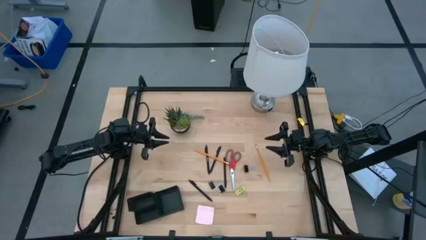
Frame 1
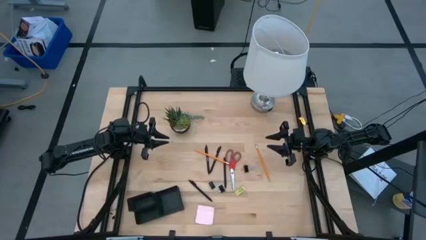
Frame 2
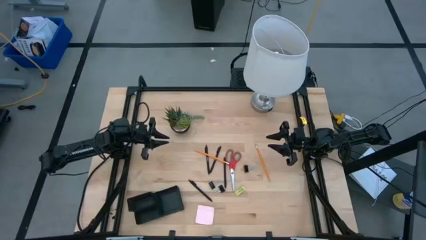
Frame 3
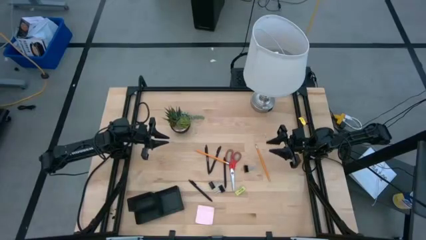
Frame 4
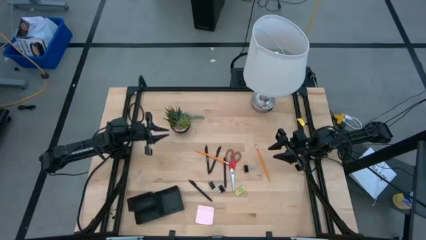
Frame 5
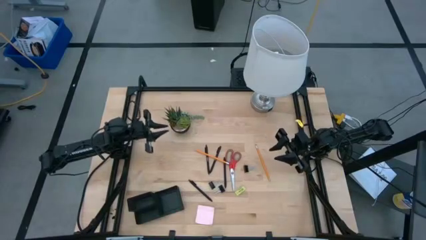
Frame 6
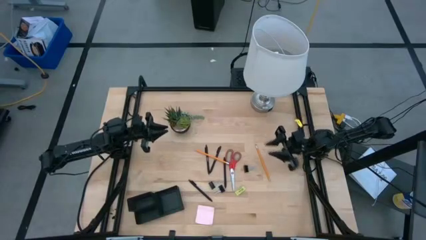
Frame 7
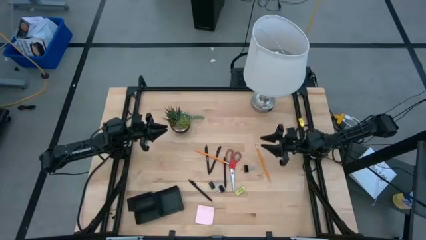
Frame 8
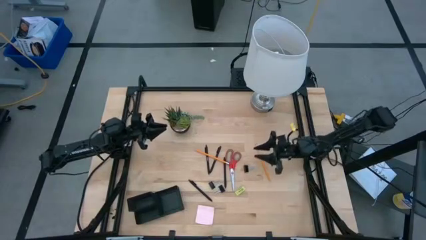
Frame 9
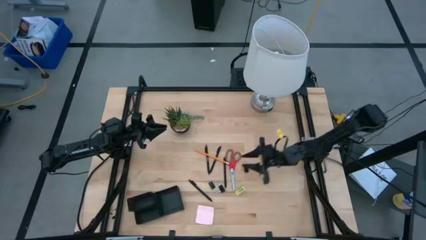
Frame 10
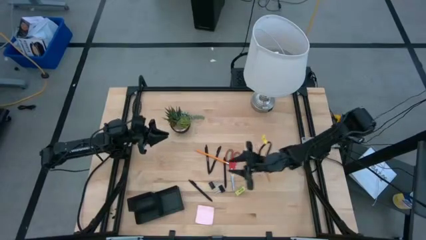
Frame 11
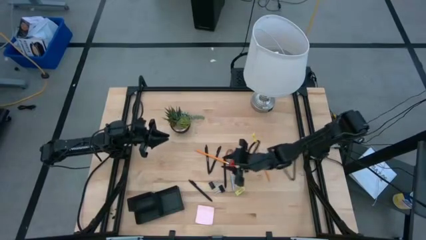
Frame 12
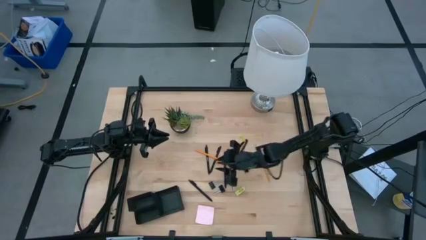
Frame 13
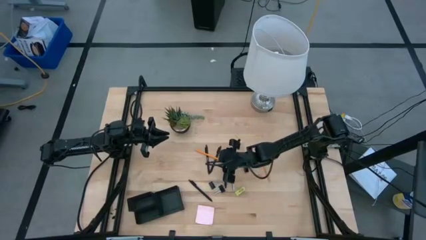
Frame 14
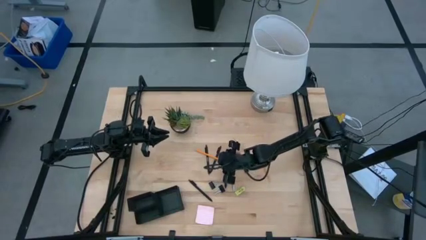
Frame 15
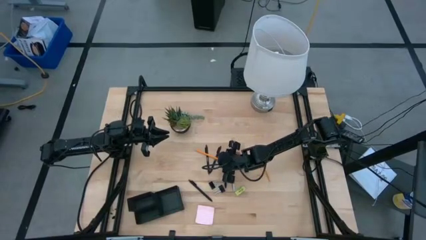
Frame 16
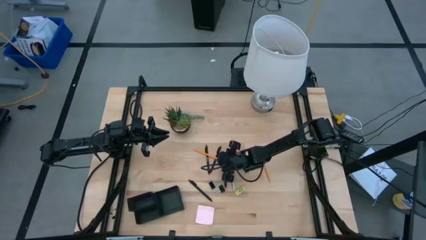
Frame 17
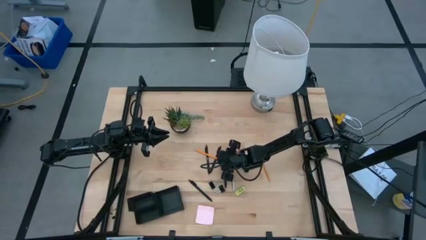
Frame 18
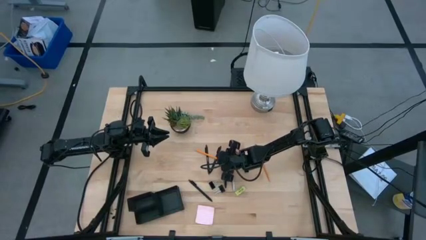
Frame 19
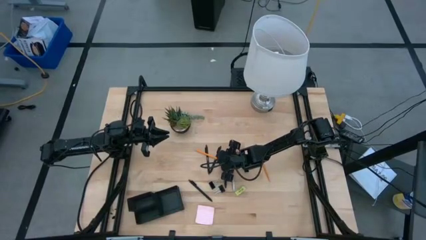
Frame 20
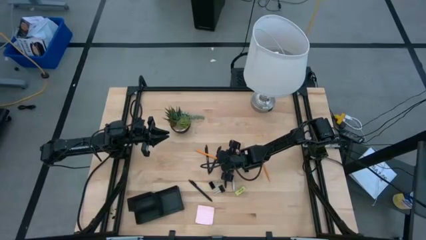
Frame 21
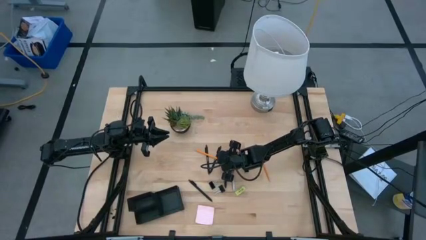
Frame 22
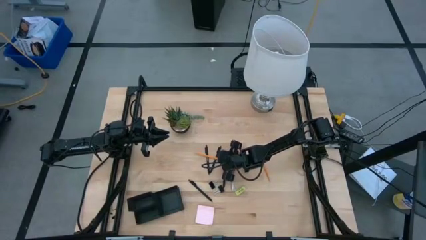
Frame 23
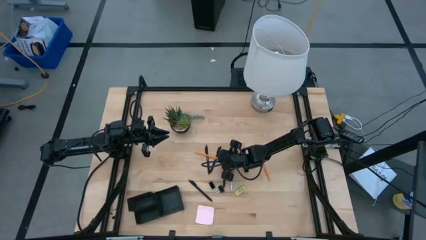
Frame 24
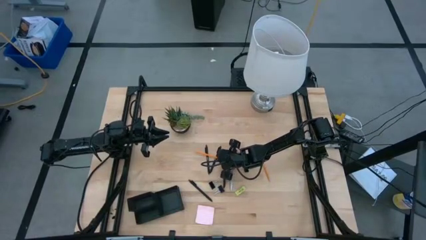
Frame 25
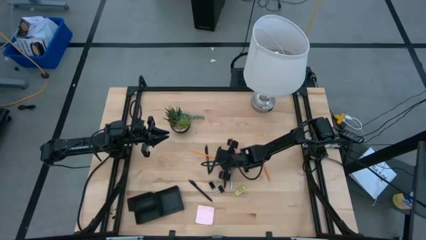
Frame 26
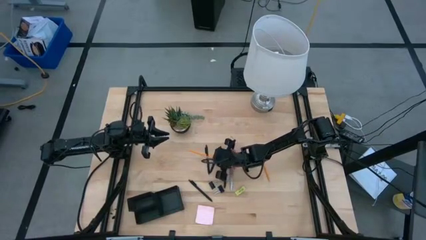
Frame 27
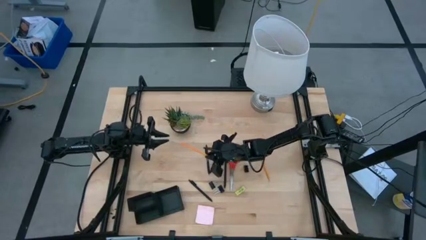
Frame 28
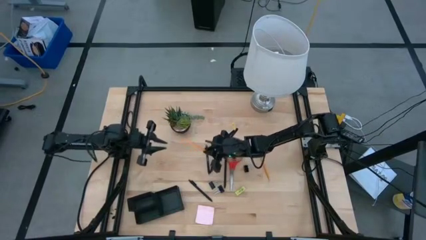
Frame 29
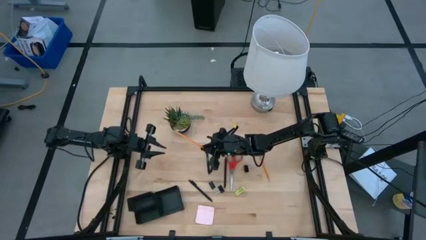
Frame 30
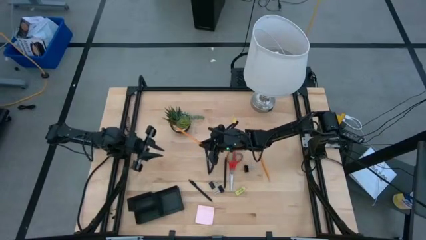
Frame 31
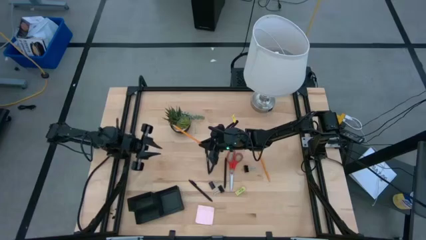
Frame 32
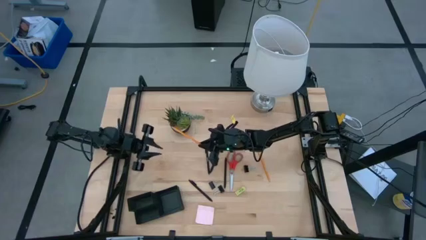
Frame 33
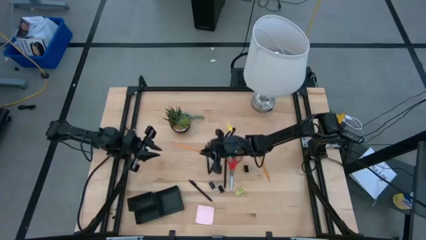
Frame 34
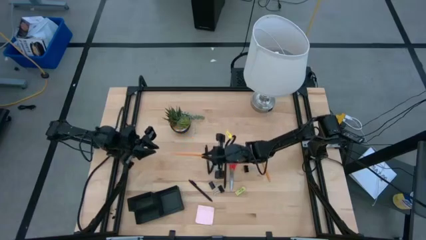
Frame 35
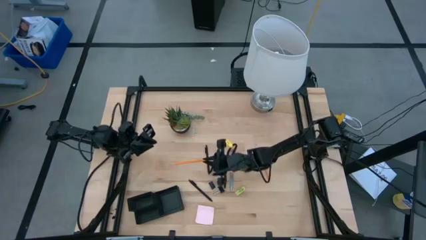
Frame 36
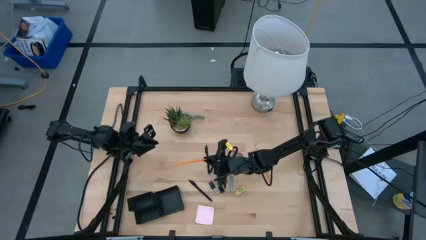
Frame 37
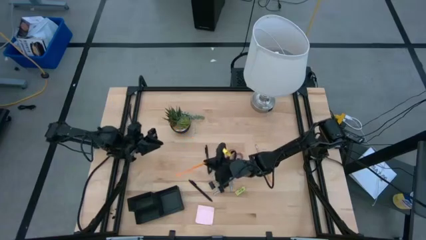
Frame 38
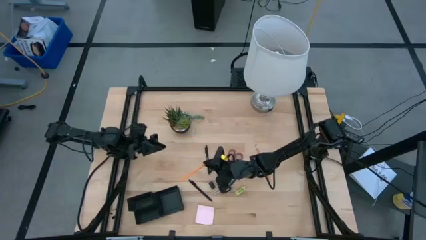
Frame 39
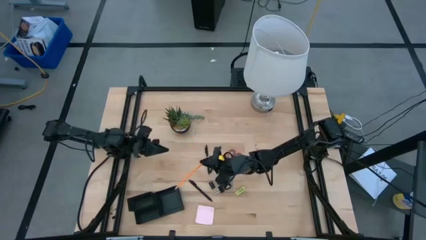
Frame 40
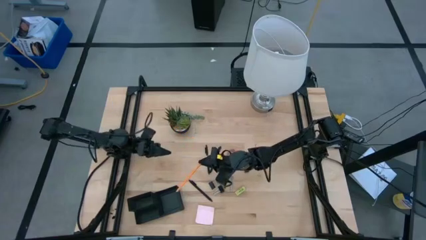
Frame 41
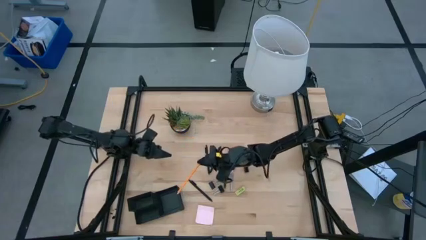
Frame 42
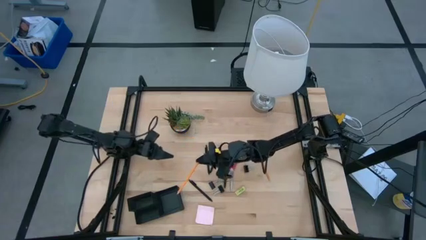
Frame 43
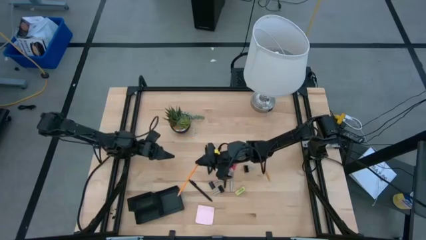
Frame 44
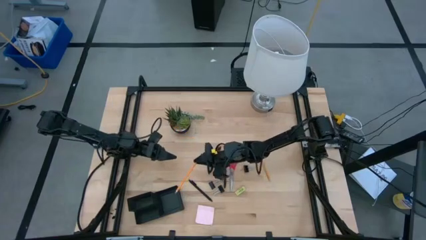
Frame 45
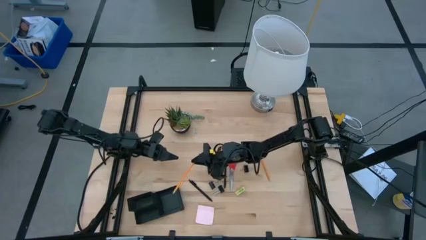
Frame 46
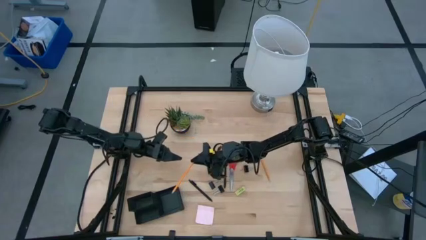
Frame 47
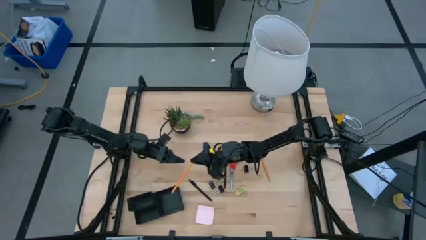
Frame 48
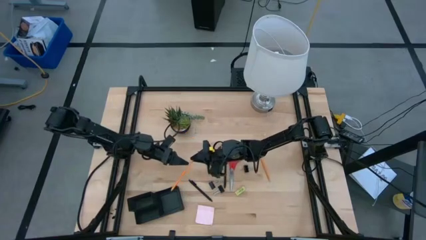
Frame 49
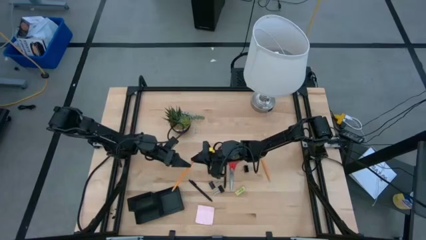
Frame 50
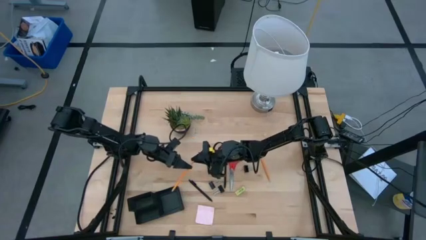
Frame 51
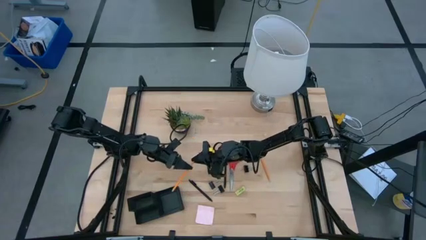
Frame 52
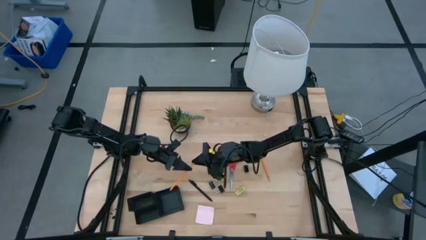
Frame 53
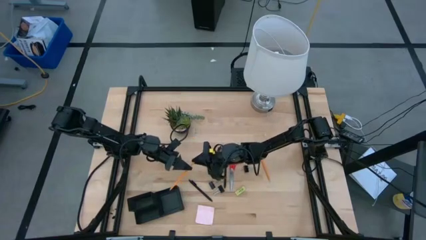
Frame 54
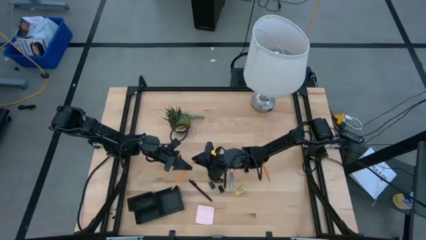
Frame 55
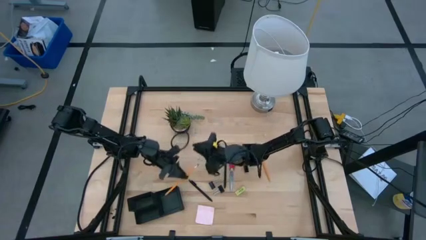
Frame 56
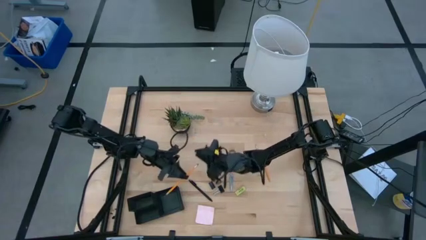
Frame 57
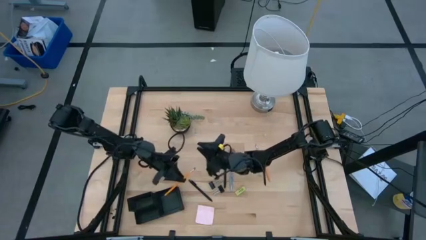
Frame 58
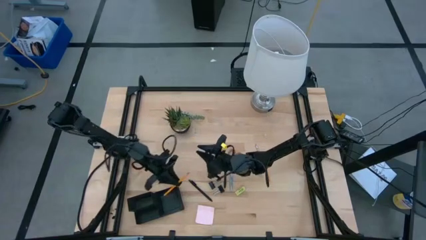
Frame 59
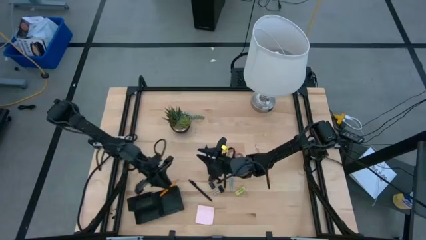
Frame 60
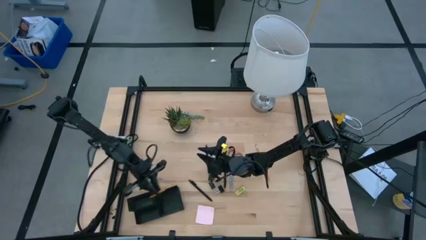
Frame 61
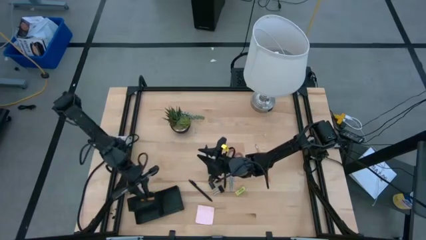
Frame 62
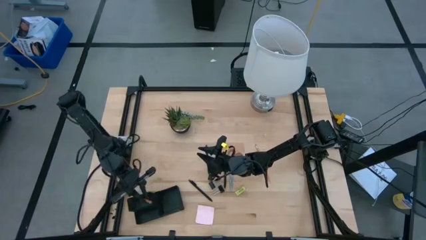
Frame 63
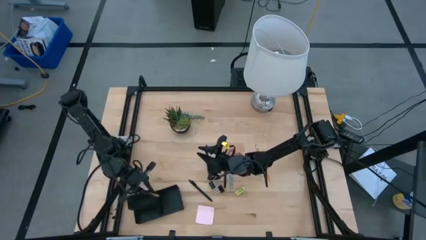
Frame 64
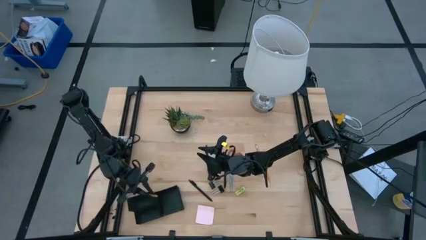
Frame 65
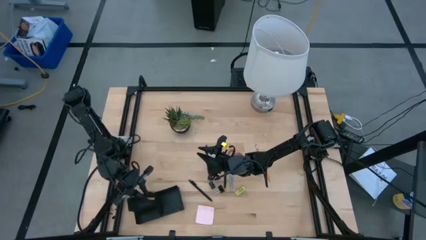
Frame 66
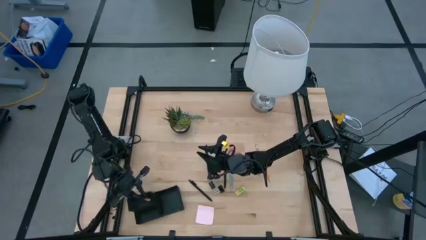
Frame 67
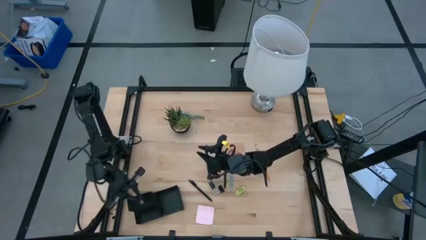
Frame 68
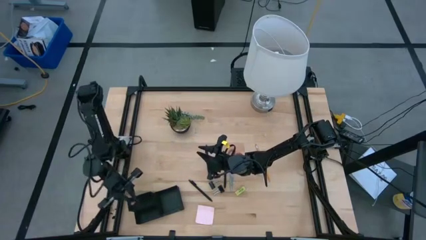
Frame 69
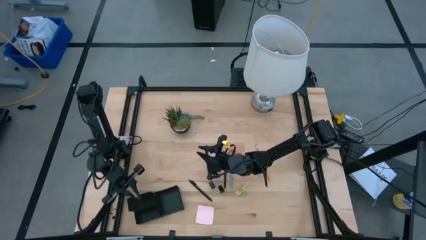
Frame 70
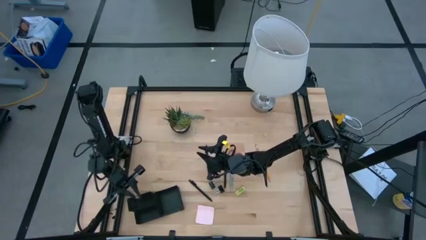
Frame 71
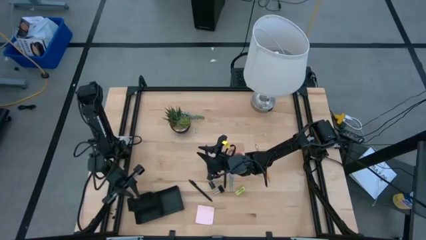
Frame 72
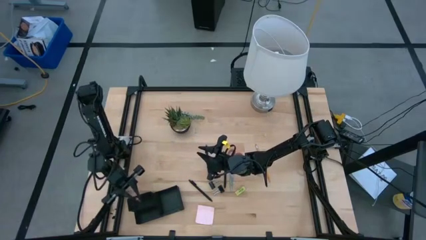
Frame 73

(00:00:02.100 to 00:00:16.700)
Task: Pick and place office supplies into organizer
Put the left pencil into the top left section of the desk organizer
